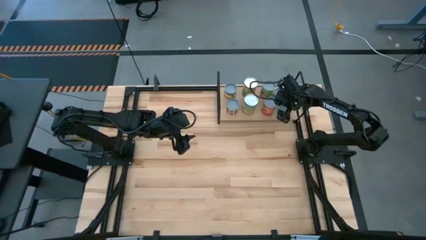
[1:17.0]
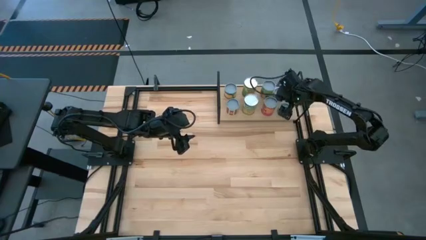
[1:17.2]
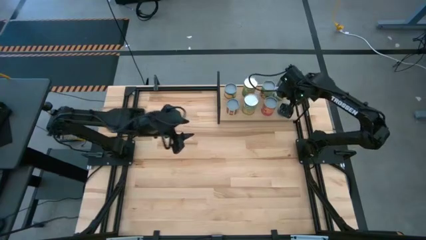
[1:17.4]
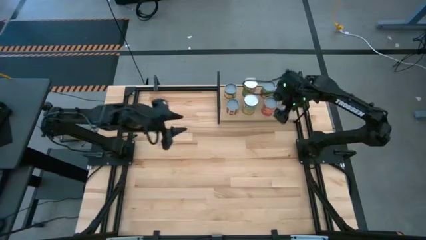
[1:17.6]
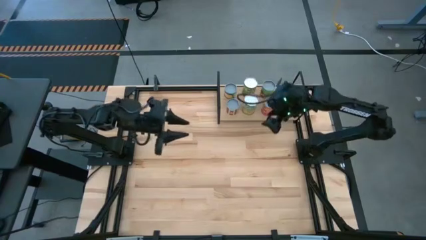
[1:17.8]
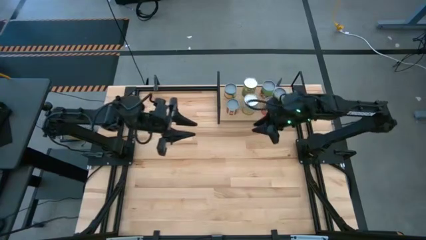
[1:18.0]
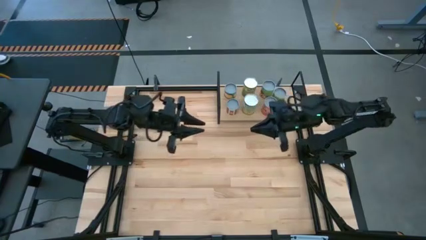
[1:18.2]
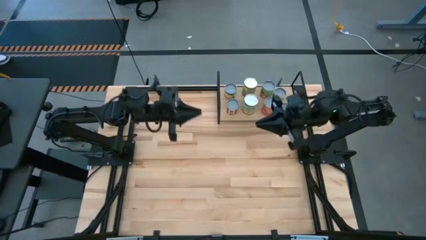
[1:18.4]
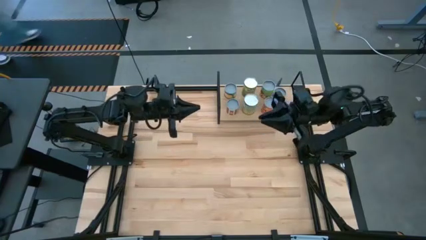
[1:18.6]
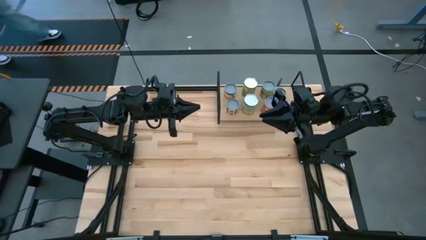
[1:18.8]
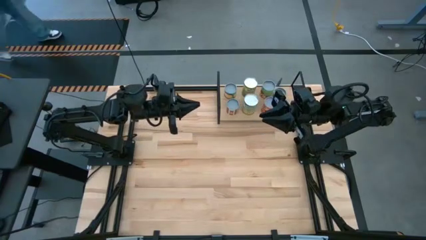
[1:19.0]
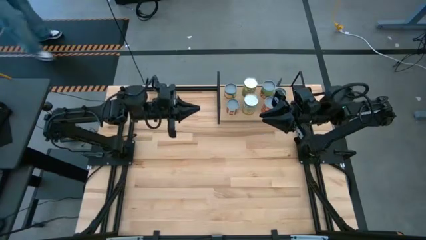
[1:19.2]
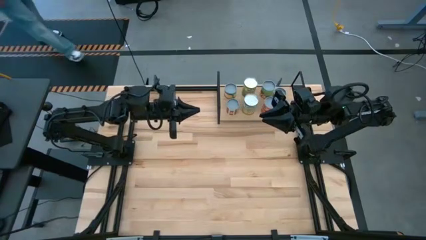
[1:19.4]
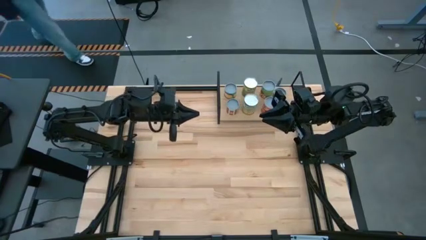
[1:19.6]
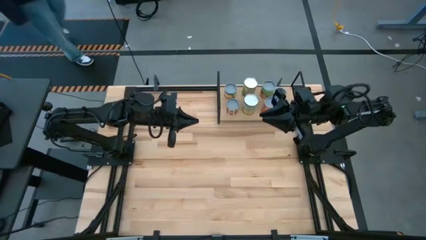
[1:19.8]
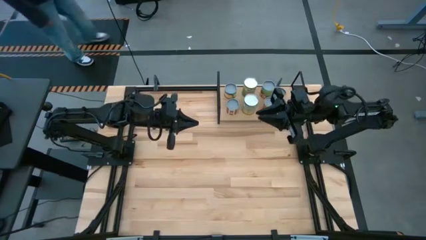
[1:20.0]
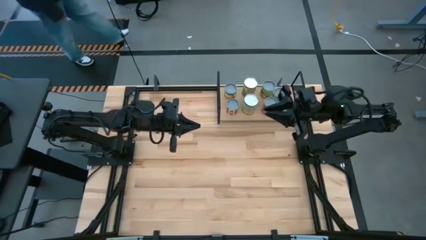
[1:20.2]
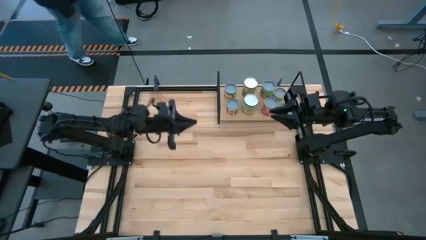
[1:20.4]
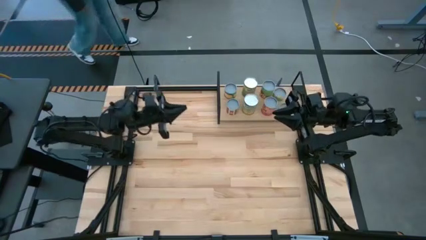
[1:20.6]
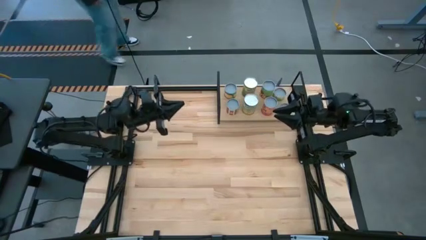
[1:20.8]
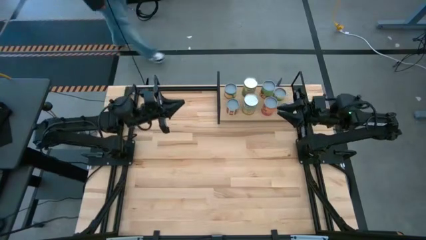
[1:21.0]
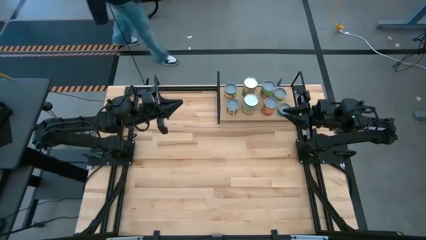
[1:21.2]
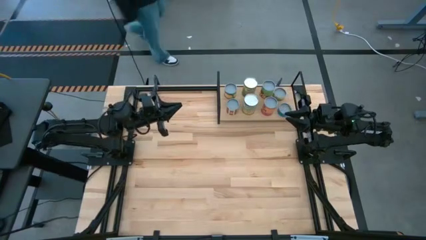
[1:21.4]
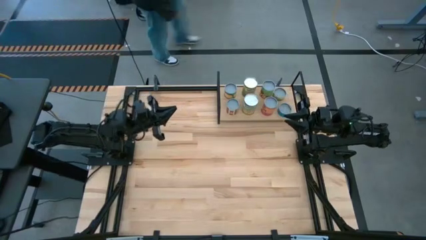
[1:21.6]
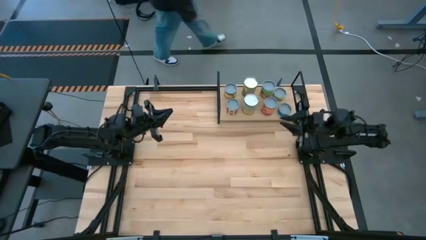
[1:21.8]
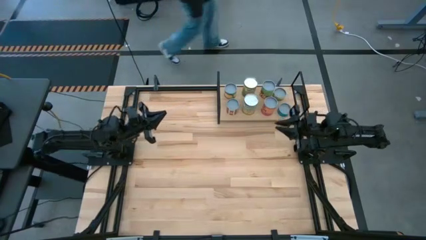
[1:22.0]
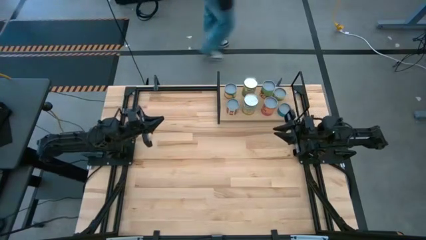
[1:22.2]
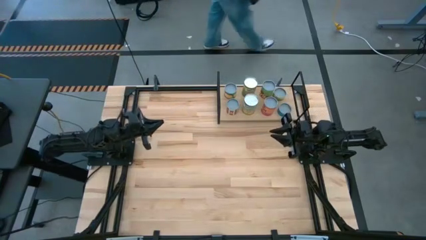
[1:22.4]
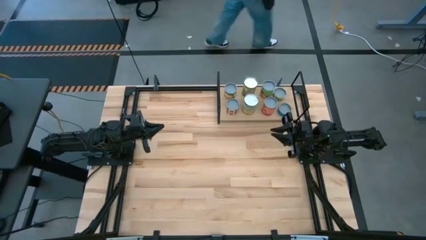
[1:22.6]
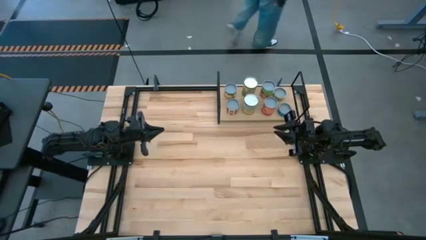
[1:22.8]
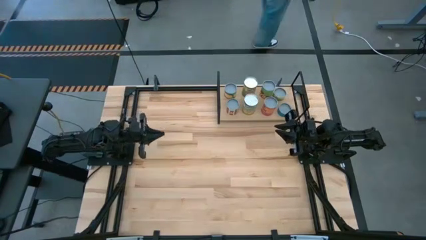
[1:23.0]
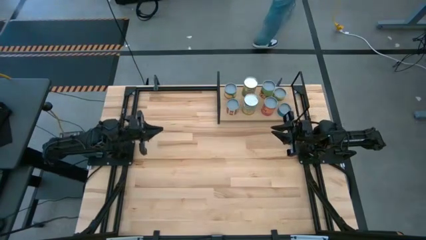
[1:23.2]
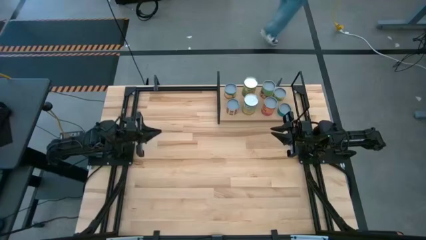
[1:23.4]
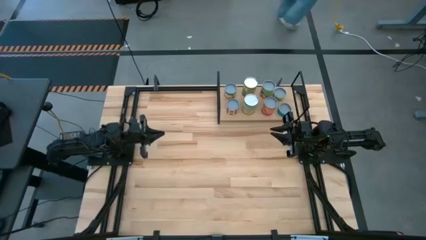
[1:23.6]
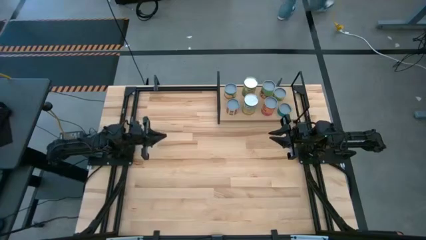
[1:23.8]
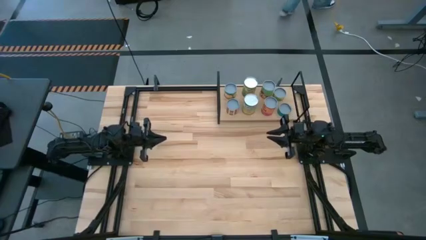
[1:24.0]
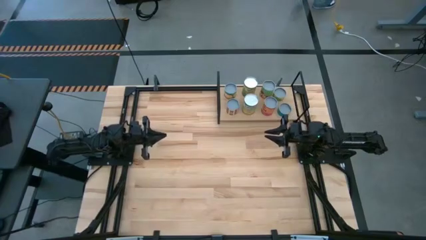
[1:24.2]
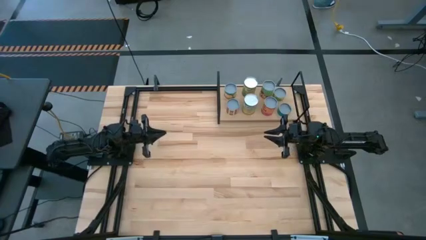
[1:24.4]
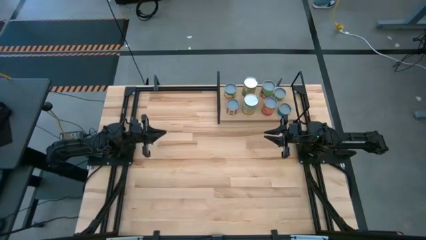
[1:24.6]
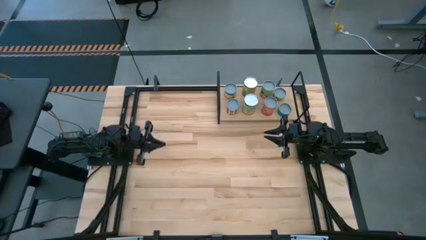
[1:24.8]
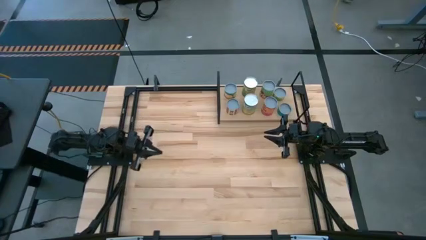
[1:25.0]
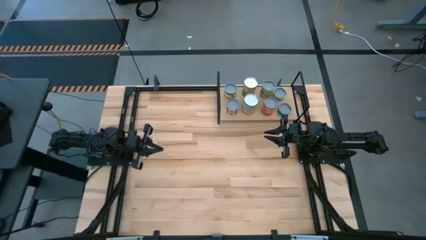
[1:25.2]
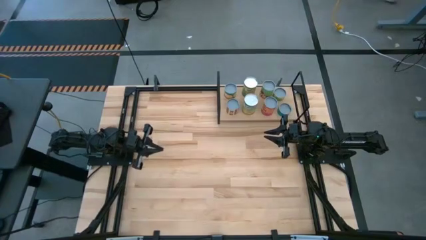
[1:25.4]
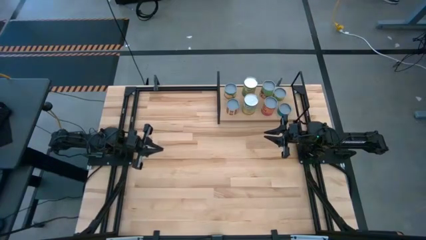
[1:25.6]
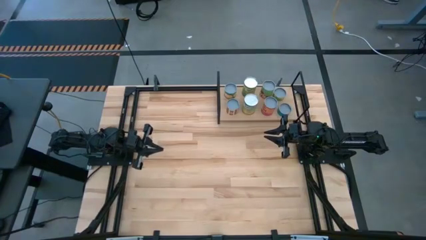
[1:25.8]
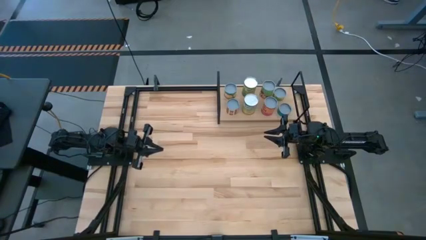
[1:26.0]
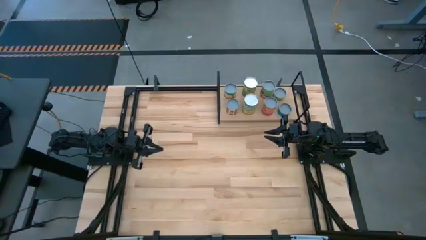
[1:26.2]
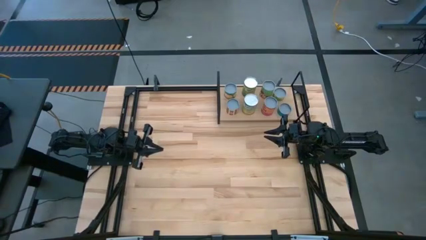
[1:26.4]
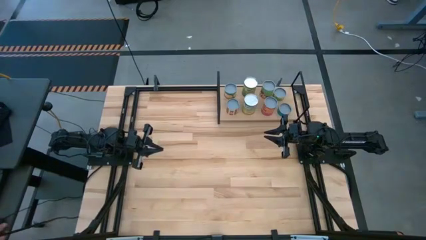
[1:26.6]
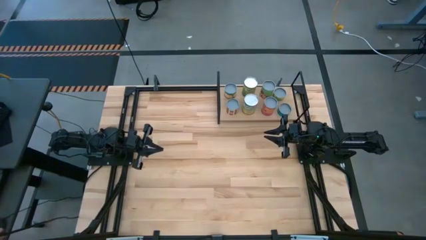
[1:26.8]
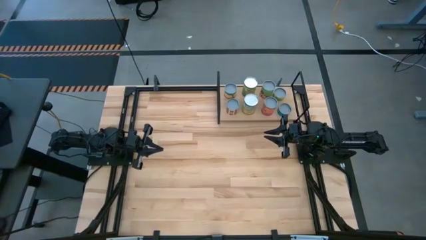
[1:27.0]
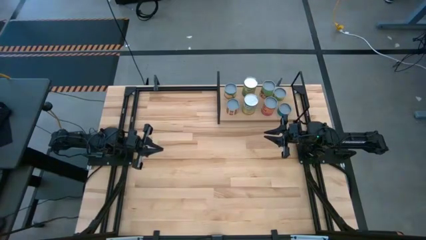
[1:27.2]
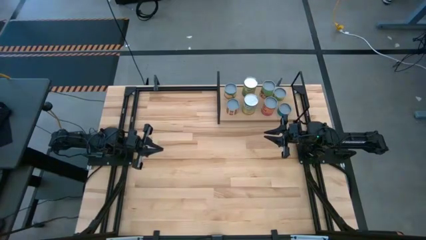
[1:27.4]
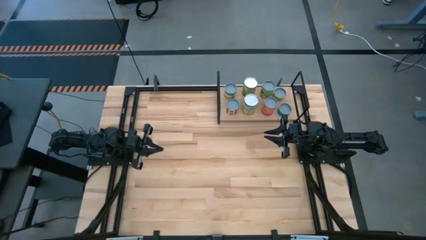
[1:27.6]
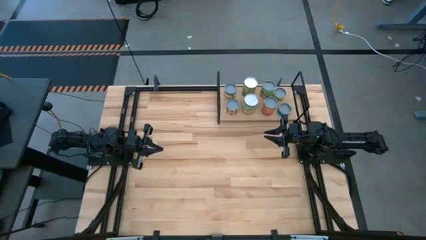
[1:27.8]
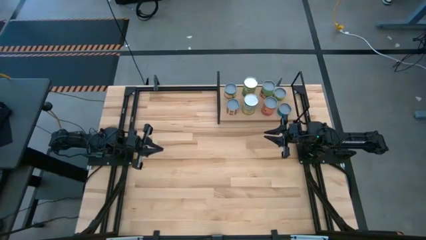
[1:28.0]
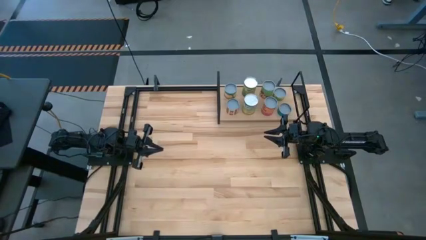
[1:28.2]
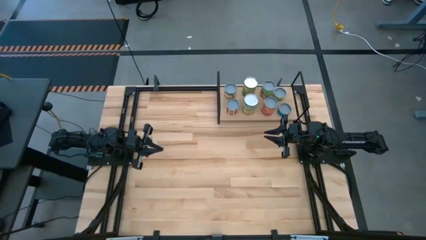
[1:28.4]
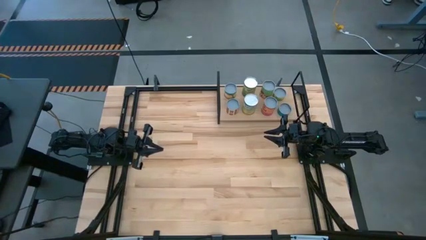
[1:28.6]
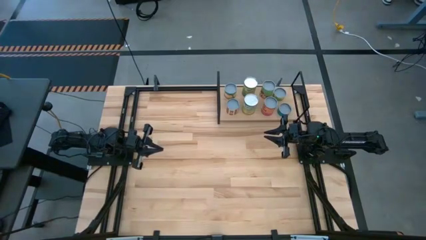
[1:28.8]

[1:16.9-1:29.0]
Task: Pick and place cans onto a shelf
Return to Home Position

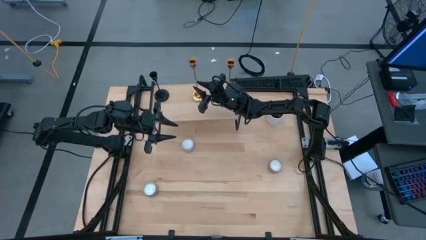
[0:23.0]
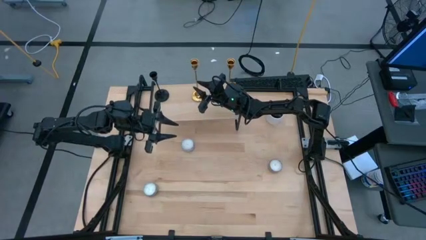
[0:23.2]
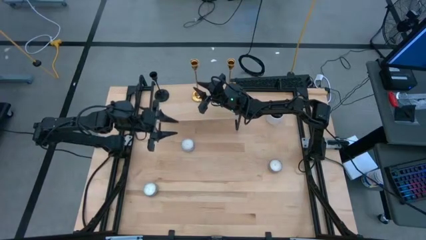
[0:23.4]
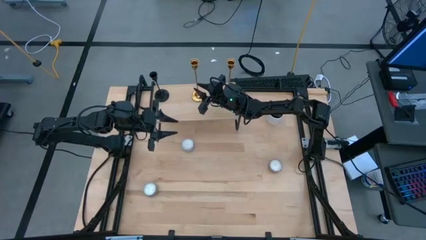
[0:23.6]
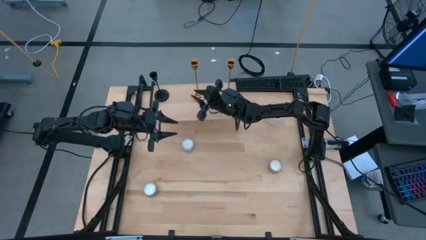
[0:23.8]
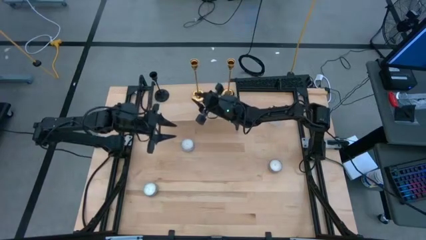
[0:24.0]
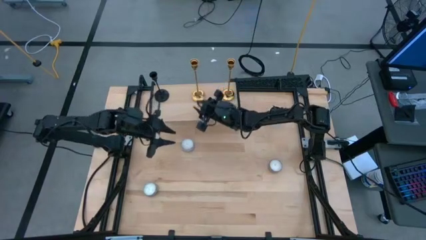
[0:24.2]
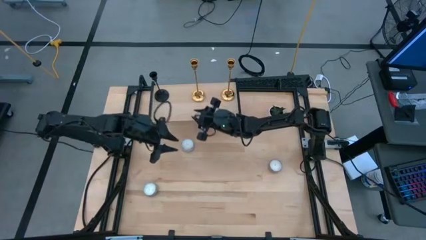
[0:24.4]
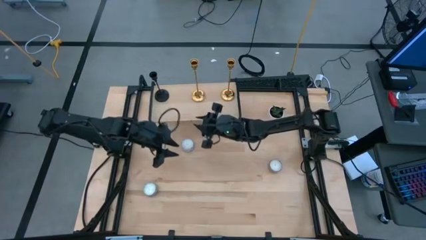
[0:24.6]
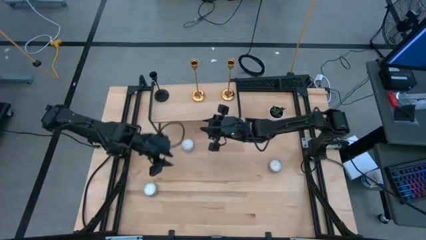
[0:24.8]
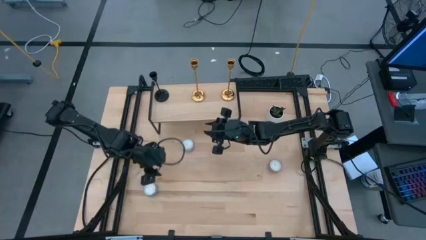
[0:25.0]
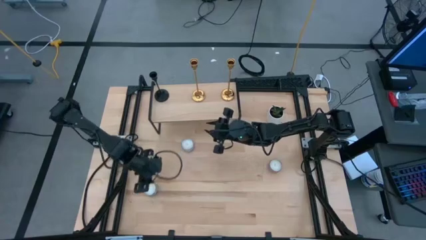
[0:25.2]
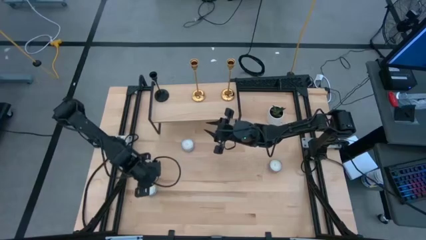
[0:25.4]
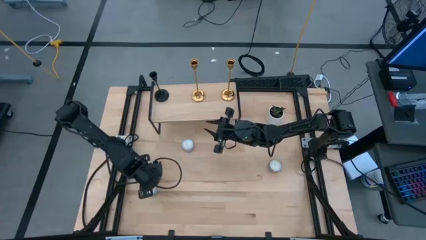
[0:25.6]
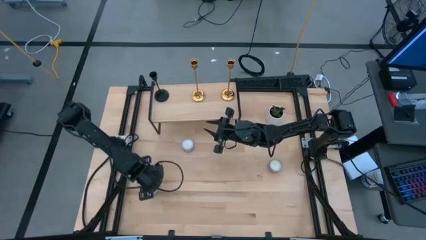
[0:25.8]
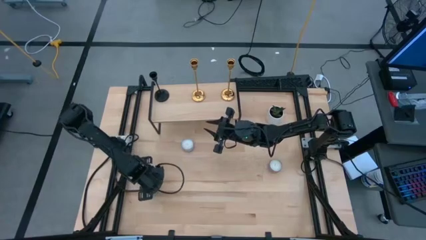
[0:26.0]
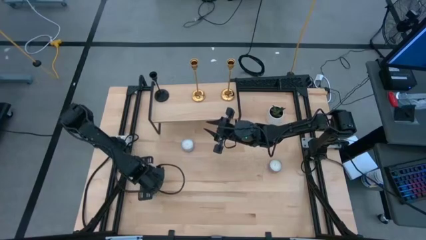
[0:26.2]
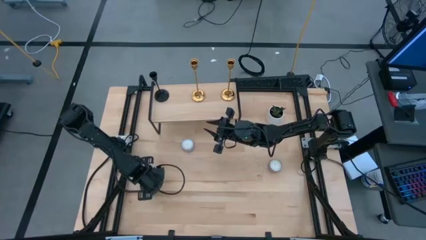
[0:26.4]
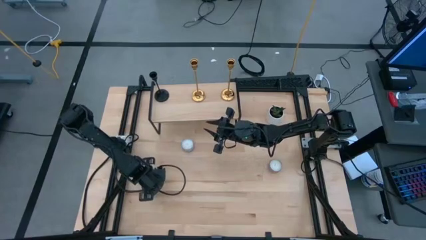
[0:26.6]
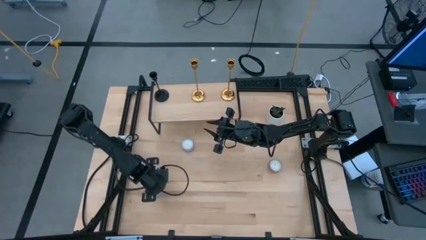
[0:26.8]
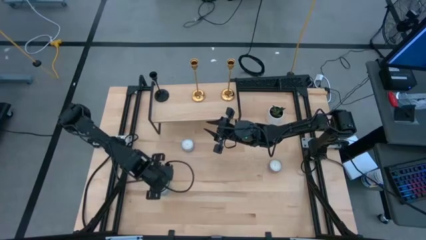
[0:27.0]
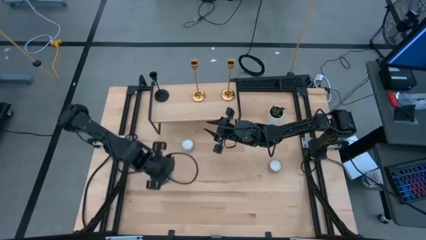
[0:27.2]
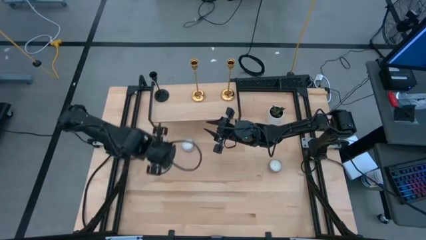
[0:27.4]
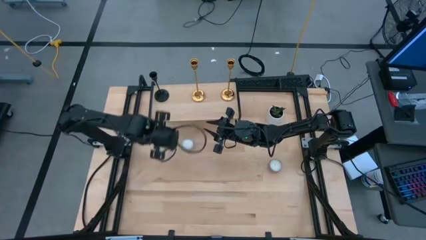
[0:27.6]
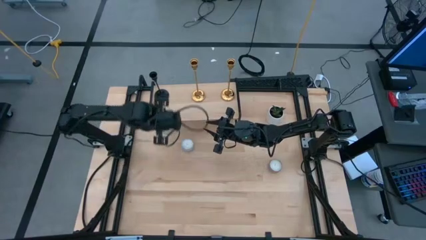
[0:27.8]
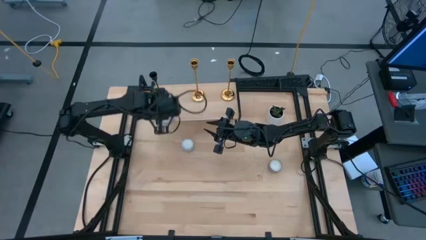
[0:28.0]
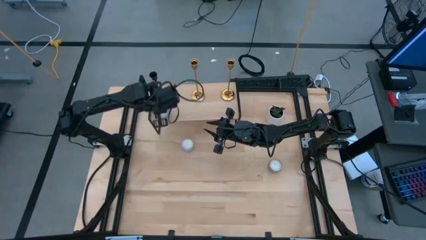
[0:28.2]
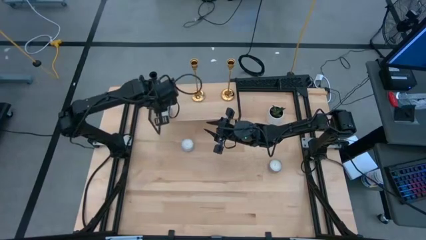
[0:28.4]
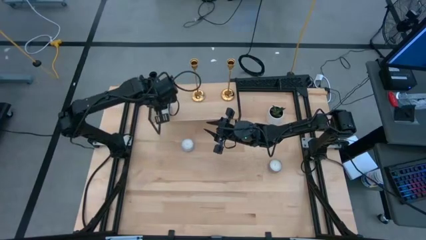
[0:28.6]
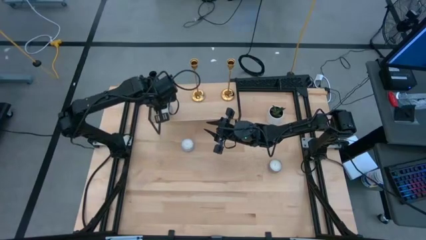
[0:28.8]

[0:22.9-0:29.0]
Task: Pick & Place candle stick holders
Put the blue patterned scented candle on the shelf
